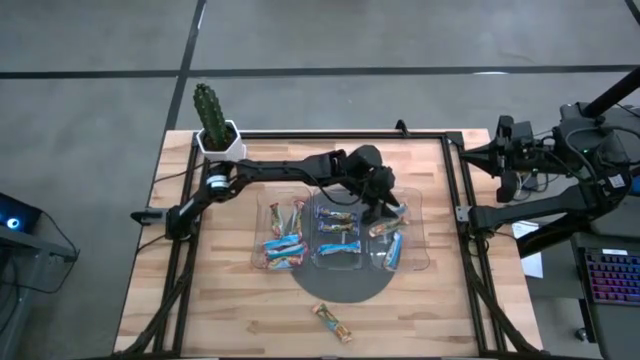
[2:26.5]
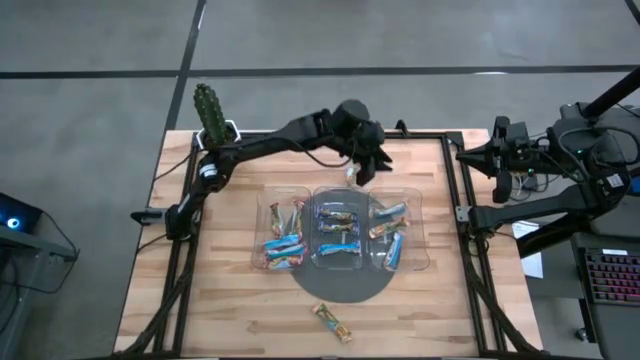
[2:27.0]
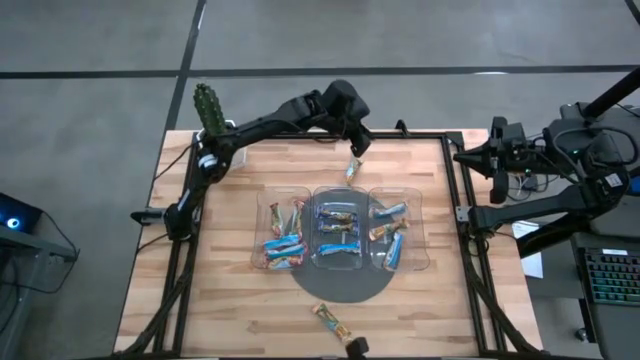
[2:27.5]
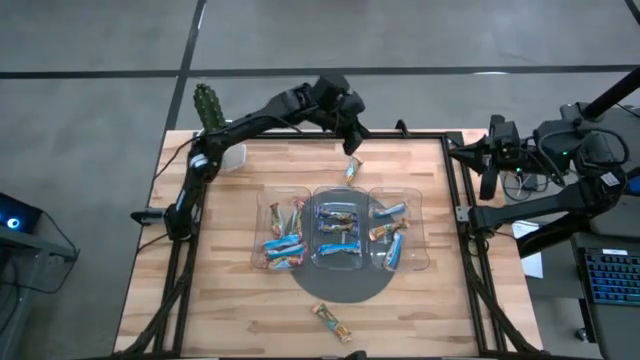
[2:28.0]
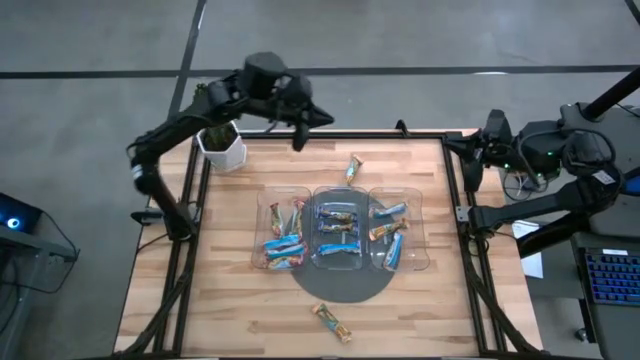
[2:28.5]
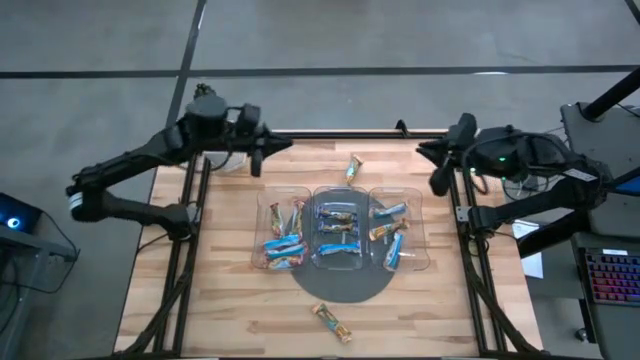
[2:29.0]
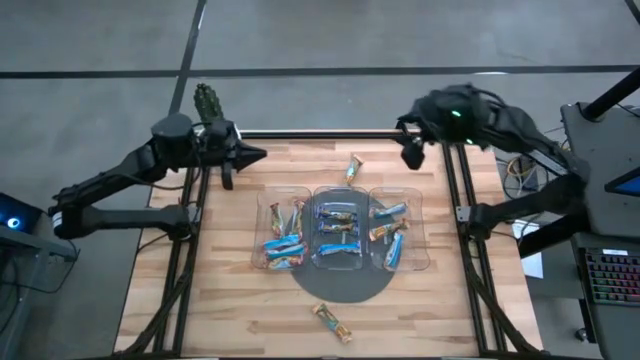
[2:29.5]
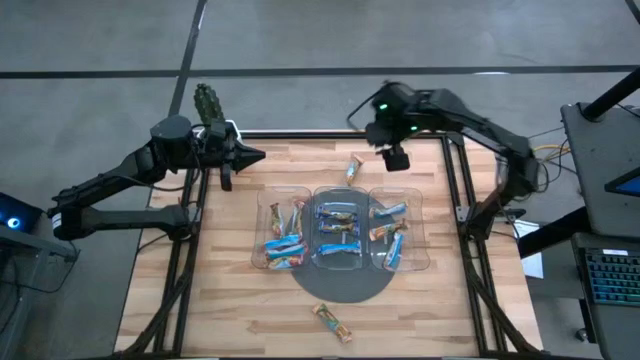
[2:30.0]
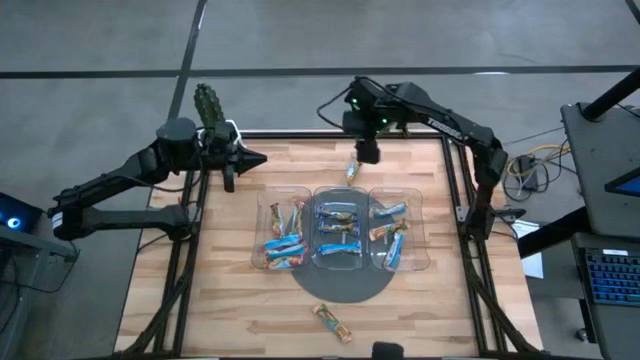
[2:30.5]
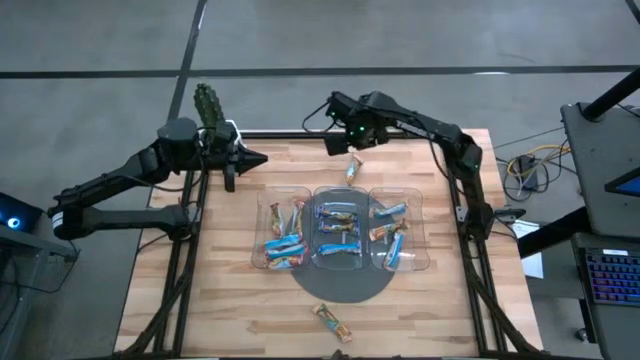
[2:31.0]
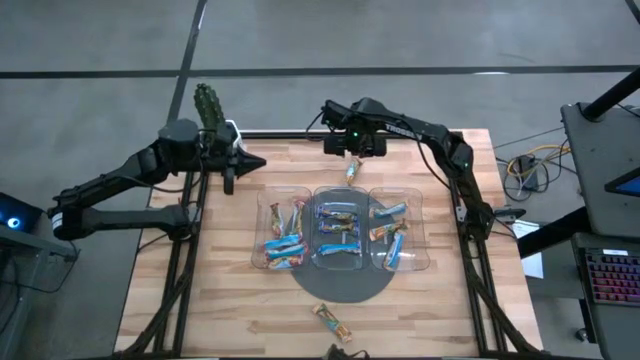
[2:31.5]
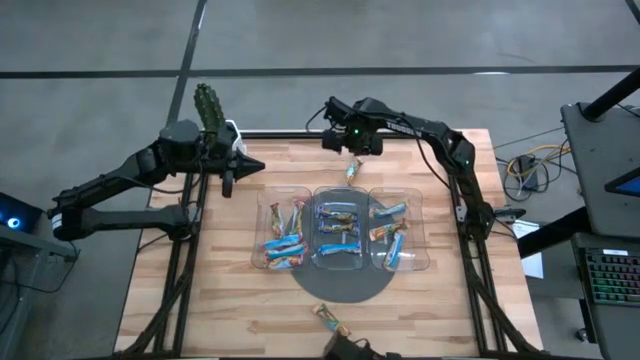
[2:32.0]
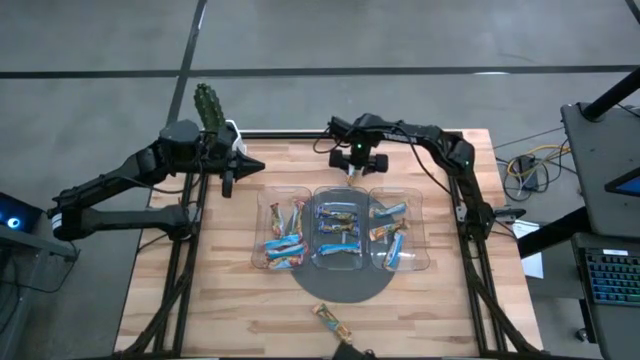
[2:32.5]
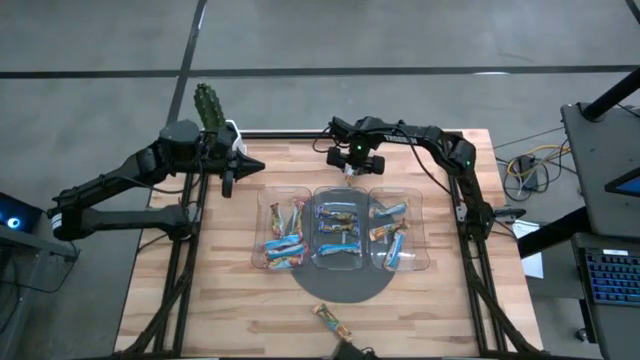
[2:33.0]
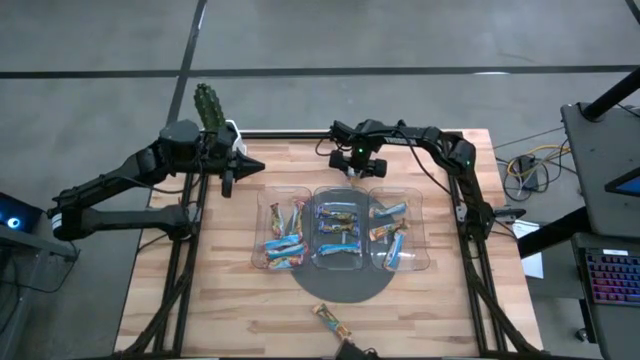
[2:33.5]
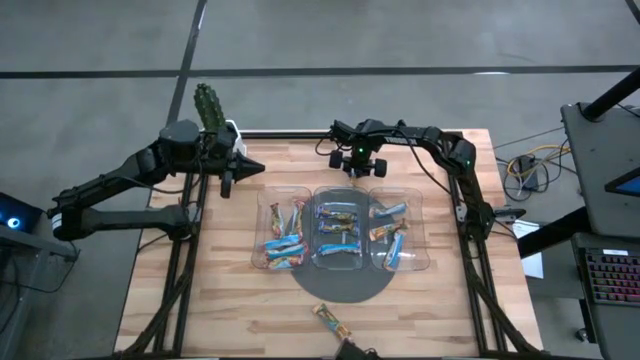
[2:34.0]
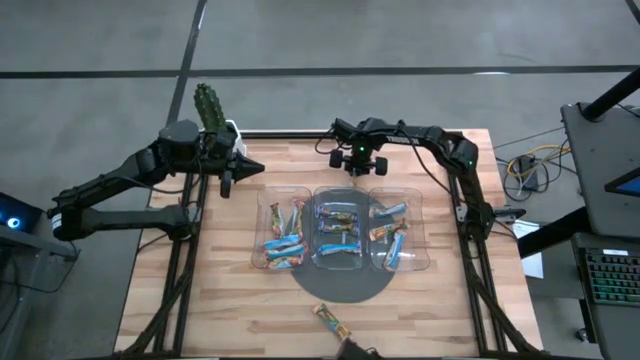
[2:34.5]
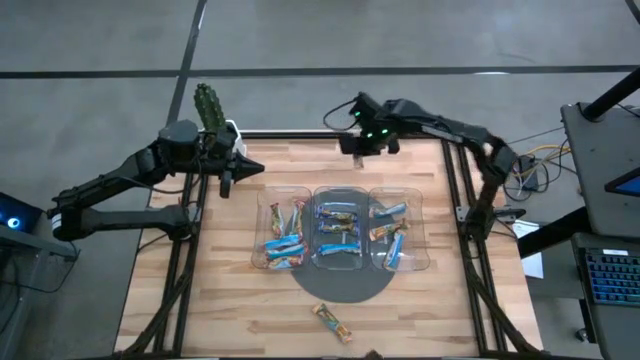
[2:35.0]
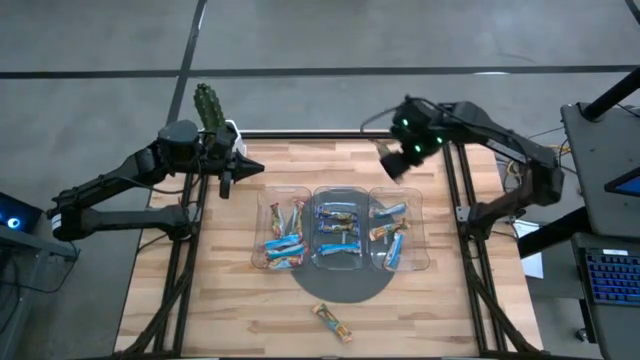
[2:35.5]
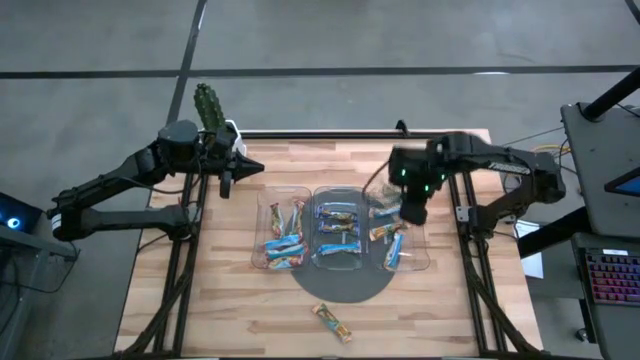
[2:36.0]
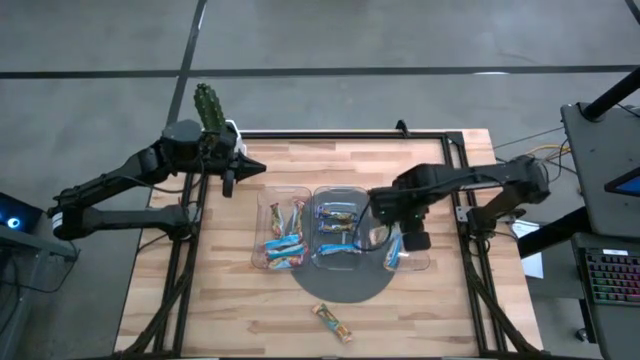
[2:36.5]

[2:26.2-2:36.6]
Task: Pick and place Granola Bars by type
Put the yellow granola bar into the right transparent bin

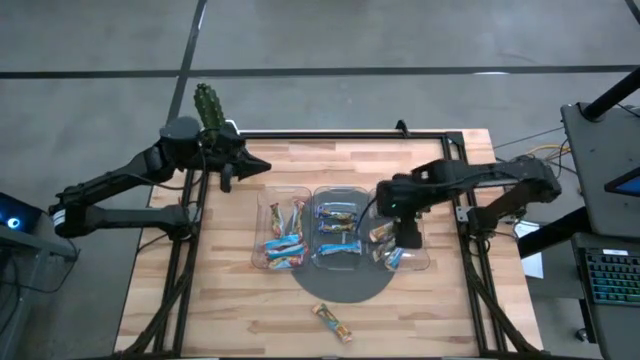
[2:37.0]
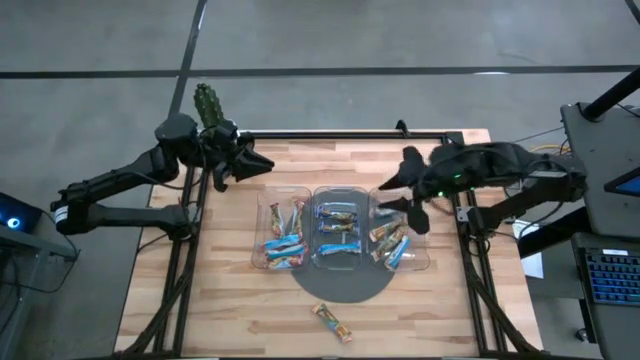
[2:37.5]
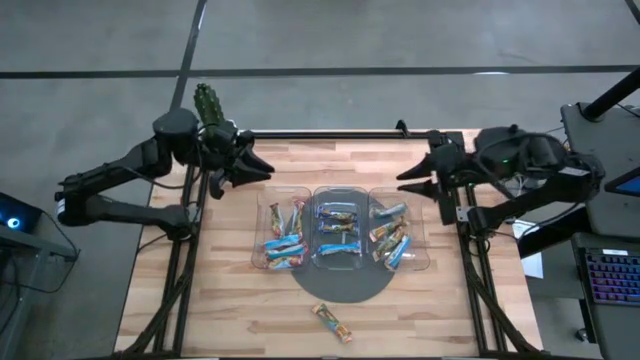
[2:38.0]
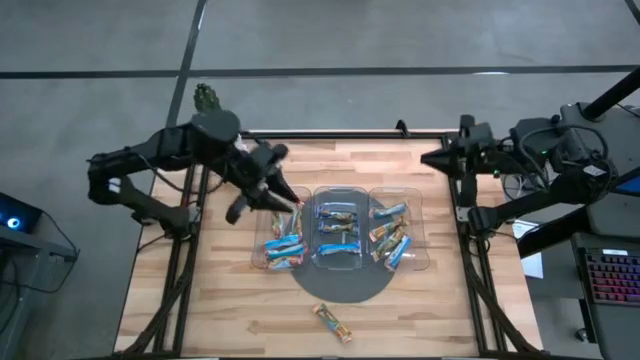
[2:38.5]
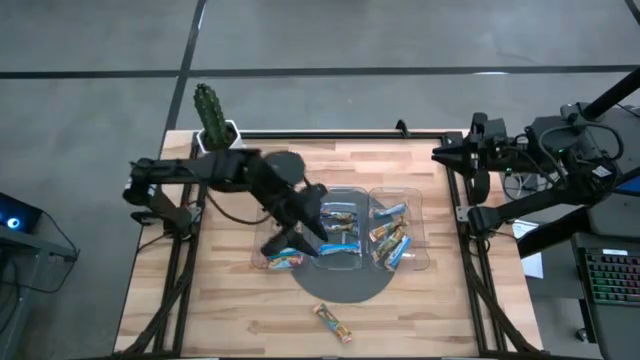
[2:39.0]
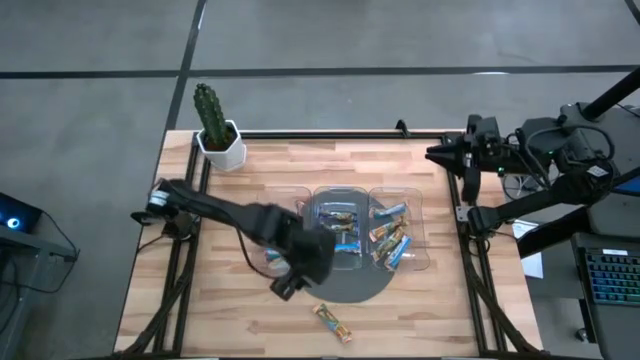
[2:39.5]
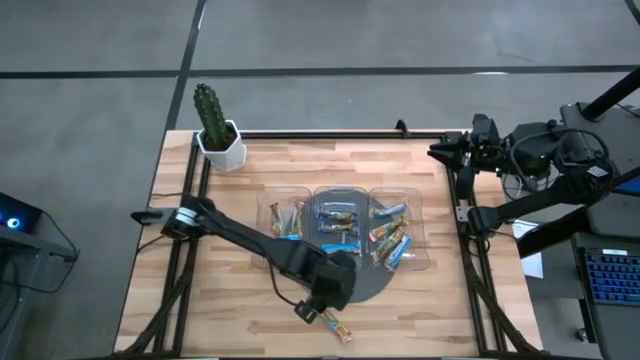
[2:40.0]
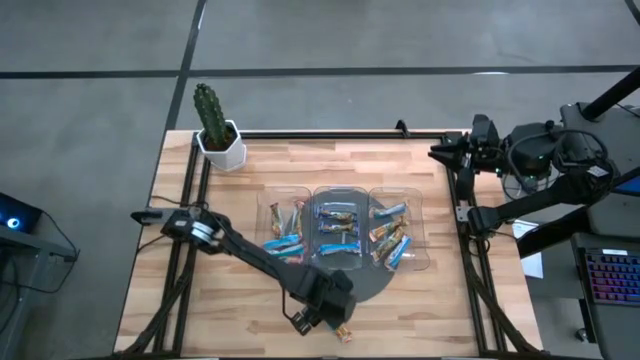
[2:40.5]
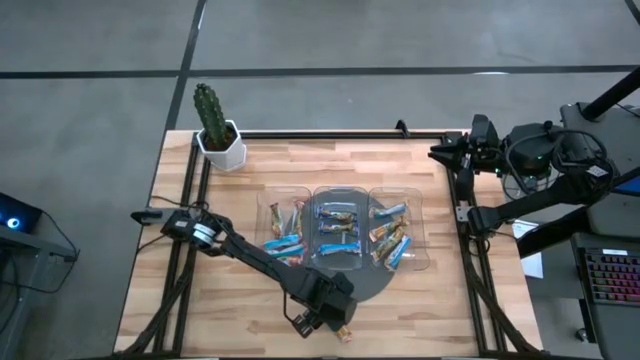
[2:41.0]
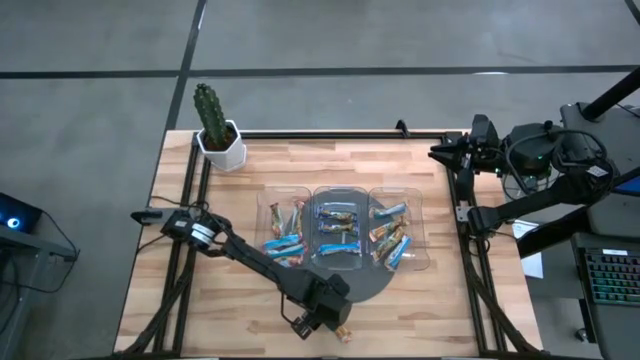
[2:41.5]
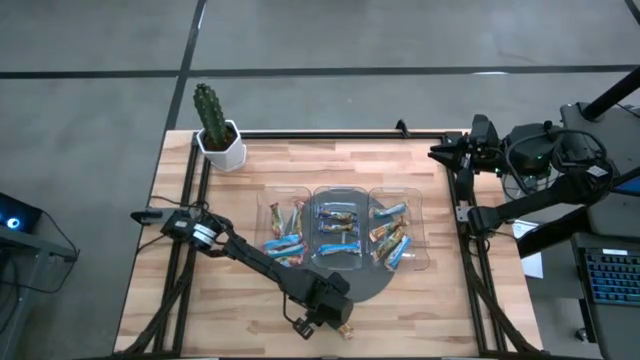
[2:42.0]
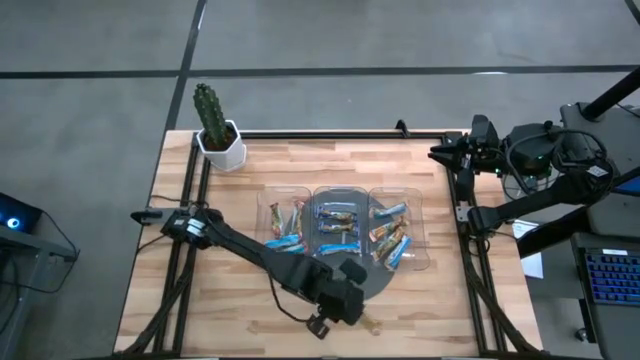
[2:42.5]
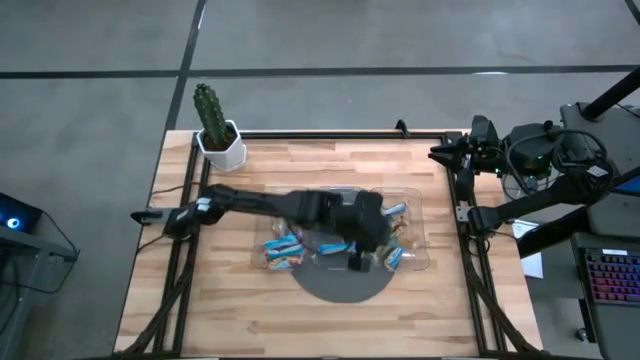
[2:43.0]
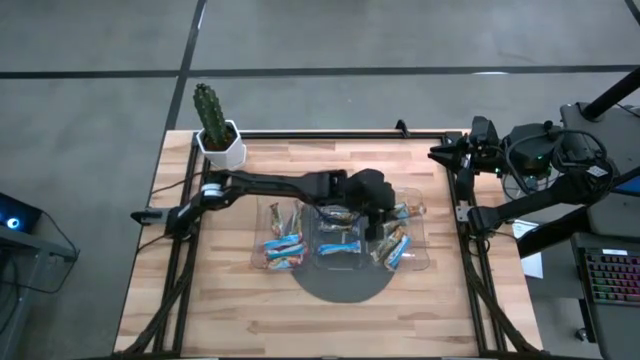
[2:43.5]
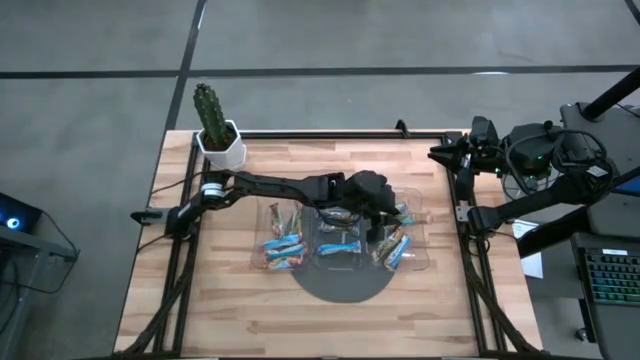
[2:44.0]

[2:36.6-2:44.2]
Put the yellow granola bar into the right transparent bin

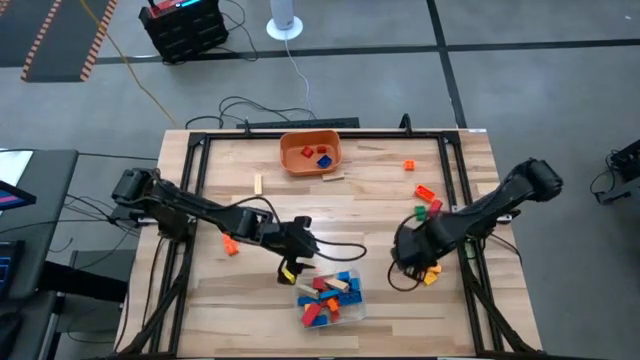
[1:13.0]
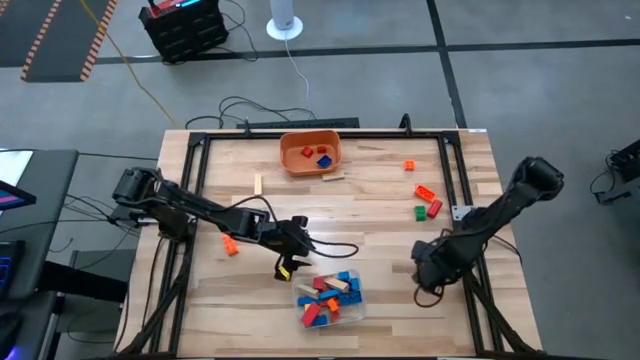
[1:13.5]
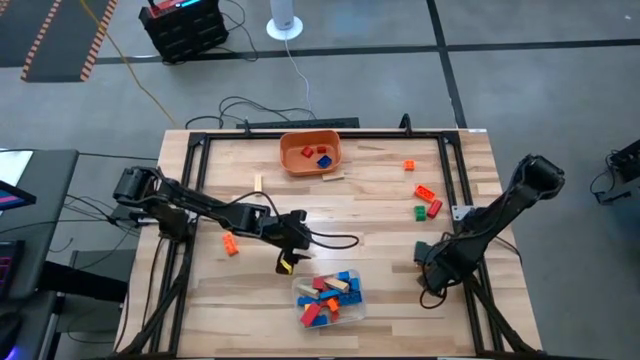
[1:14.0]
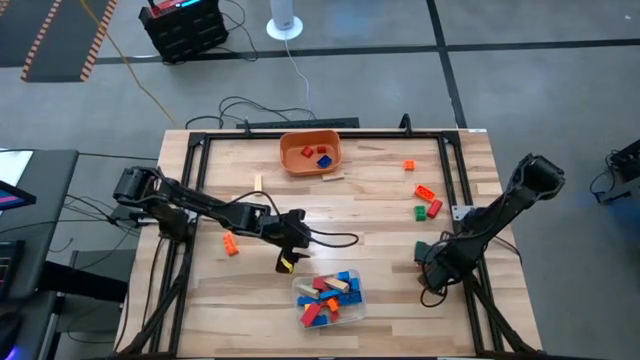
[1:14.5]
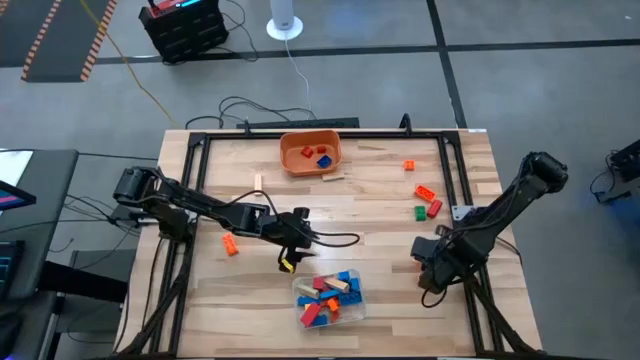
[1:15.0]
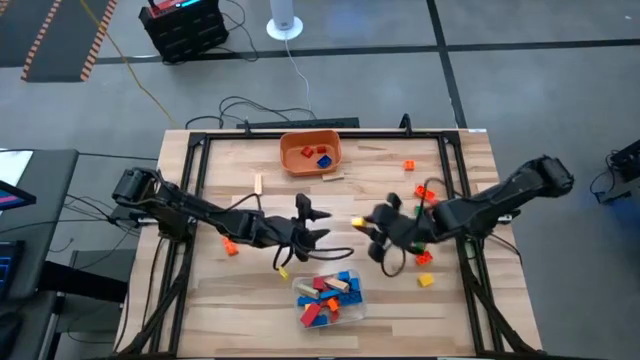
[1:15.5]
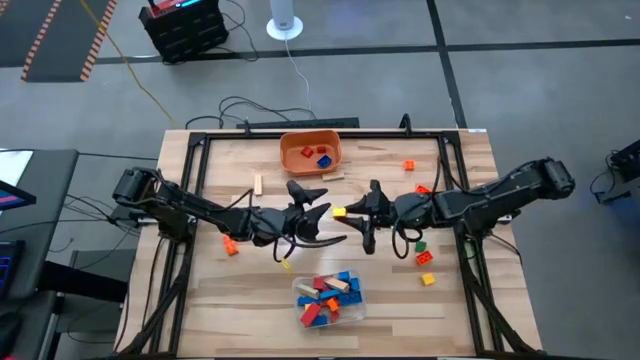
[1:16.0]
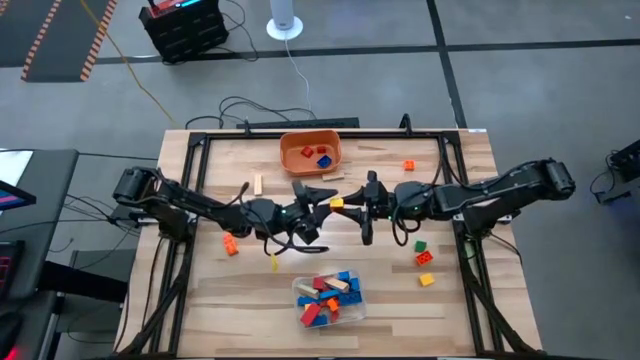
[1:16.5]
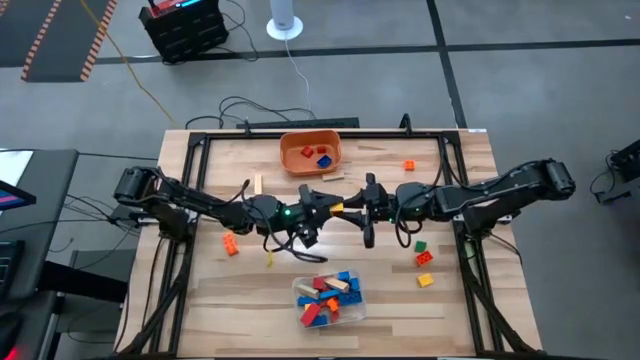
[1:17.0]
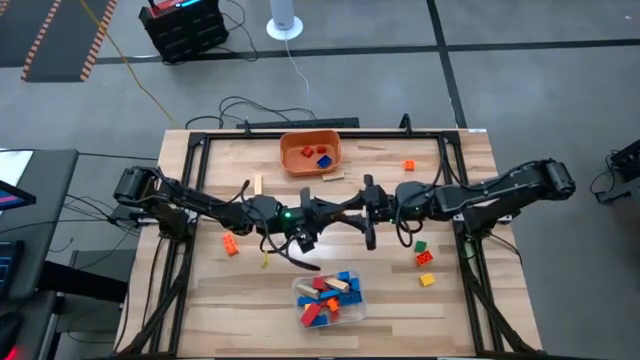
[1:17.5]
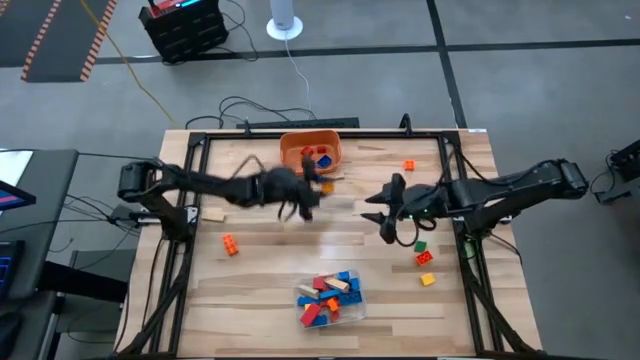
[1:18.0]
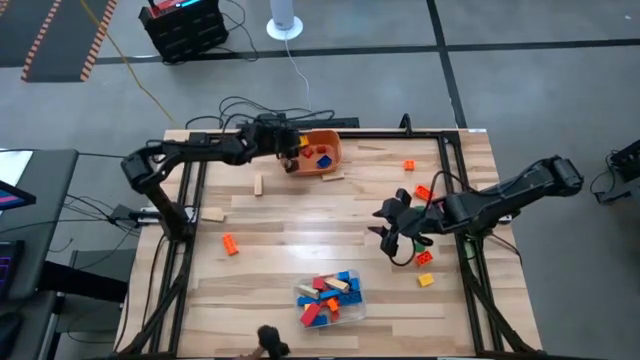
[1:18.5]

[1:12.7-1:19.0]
Task: Sort blocks by size
Put the small yellow game piece into the orange bin
